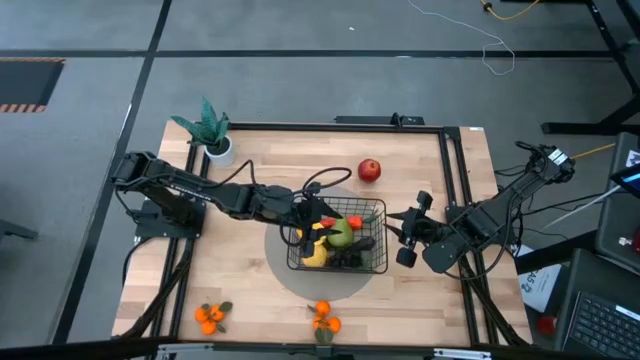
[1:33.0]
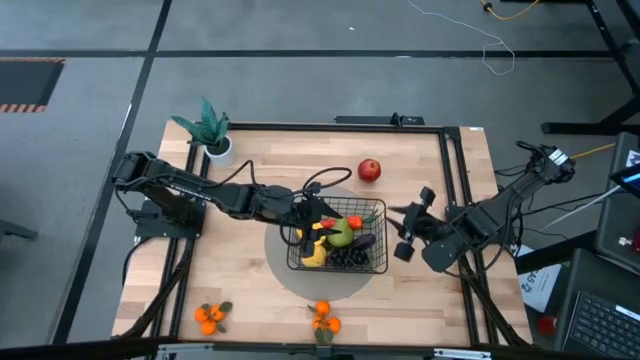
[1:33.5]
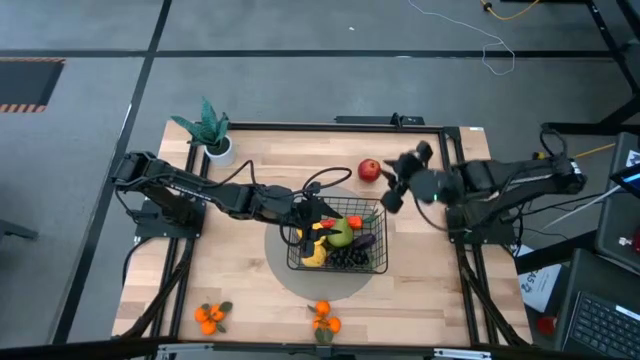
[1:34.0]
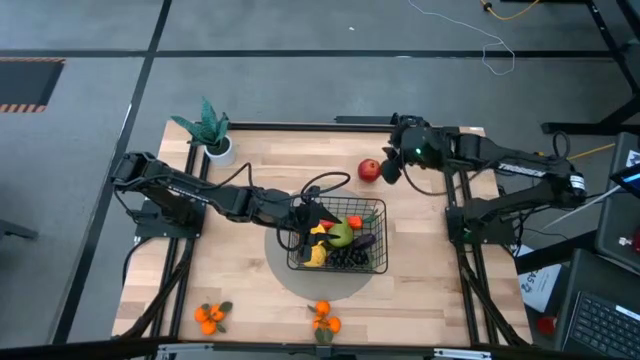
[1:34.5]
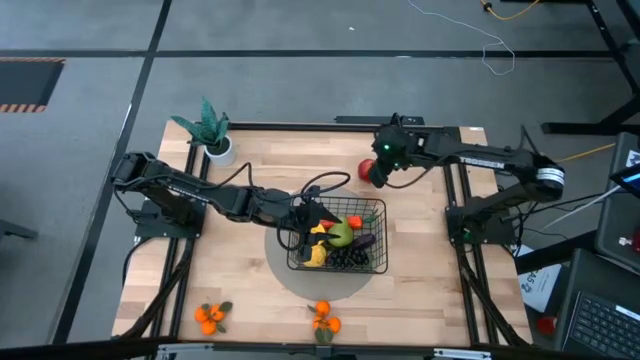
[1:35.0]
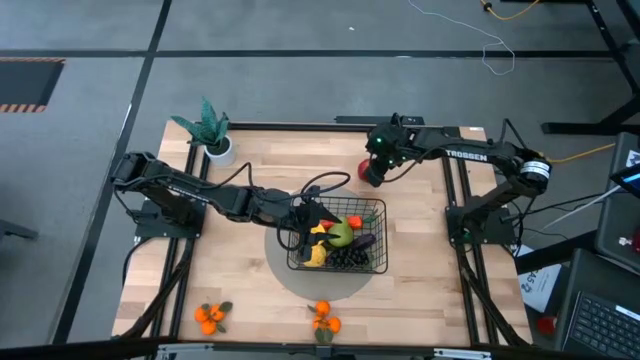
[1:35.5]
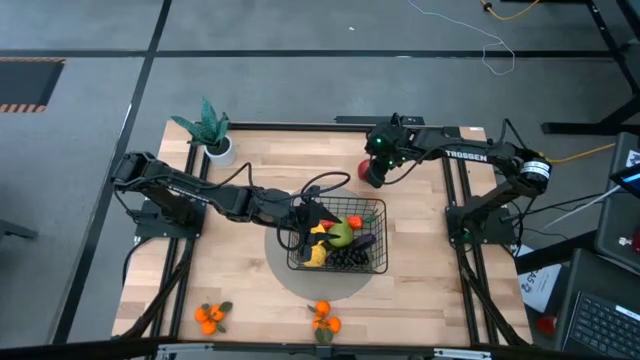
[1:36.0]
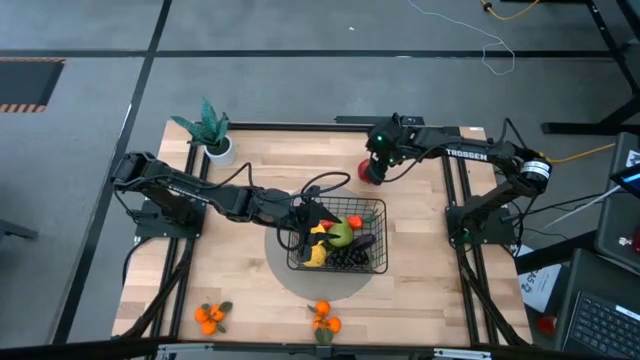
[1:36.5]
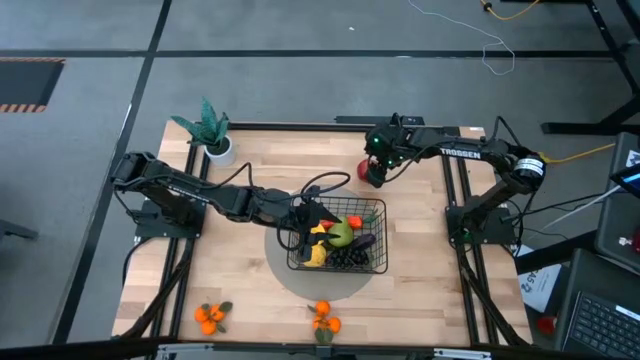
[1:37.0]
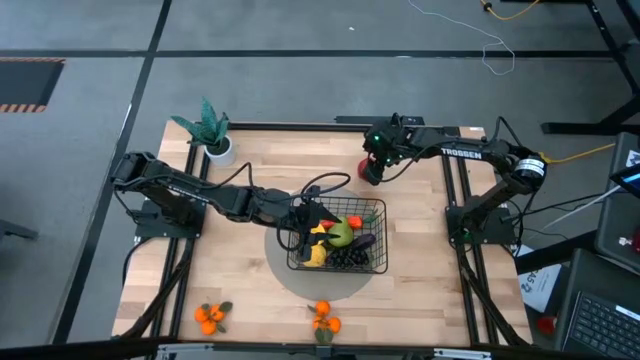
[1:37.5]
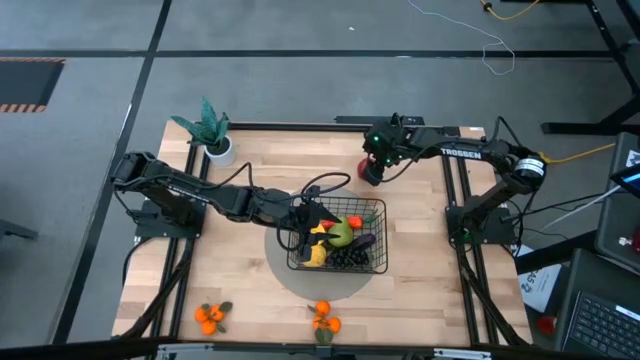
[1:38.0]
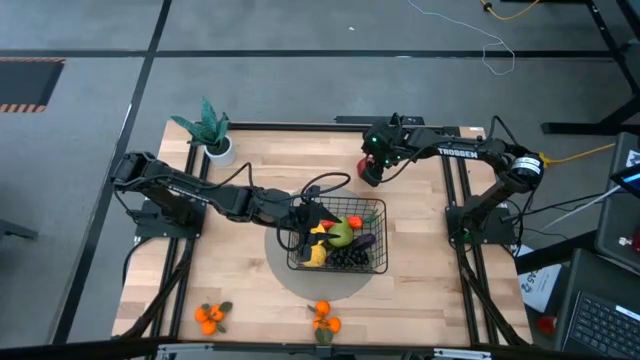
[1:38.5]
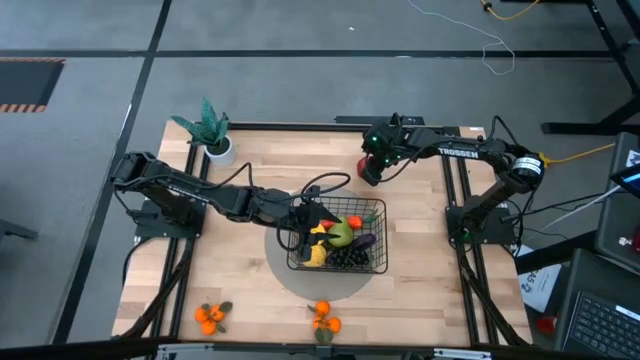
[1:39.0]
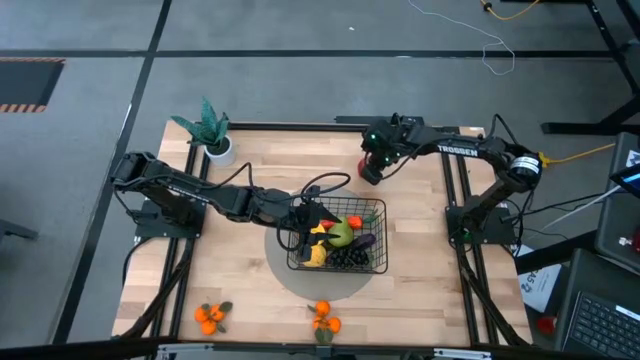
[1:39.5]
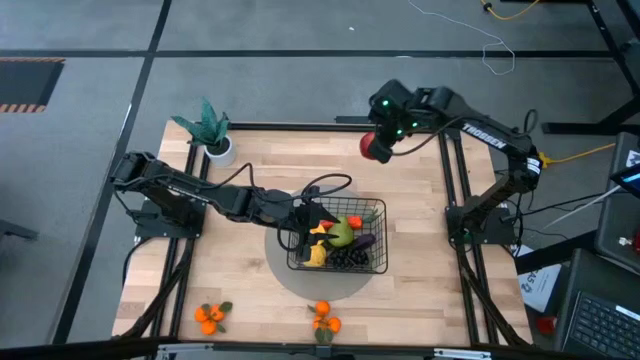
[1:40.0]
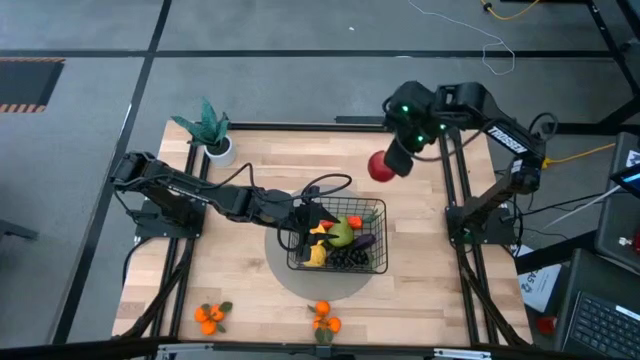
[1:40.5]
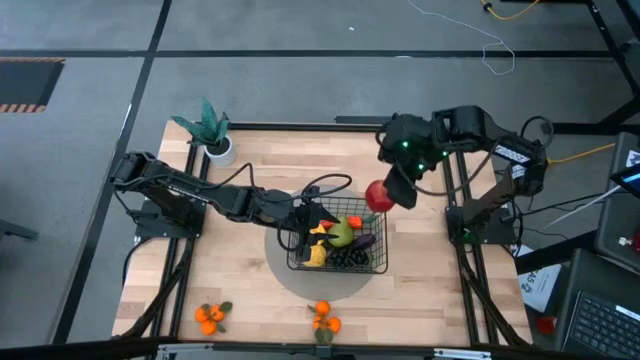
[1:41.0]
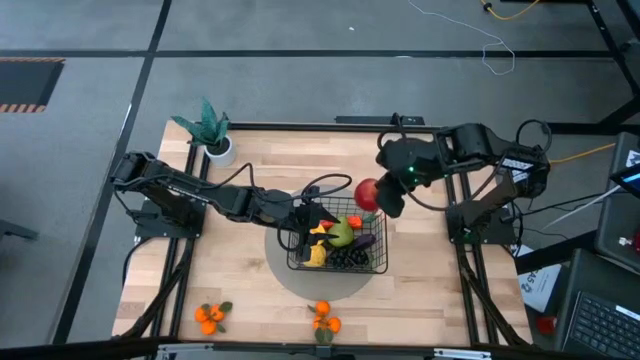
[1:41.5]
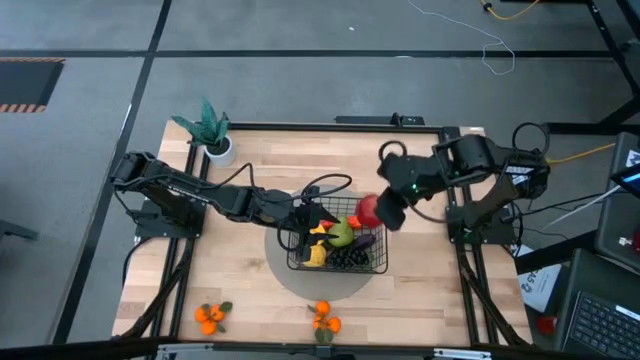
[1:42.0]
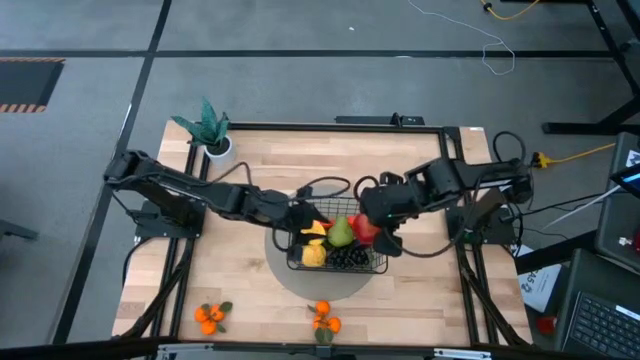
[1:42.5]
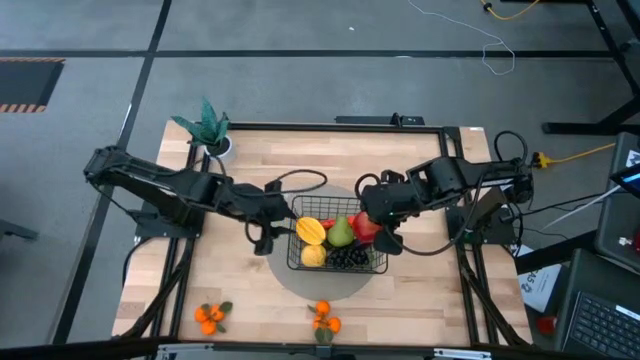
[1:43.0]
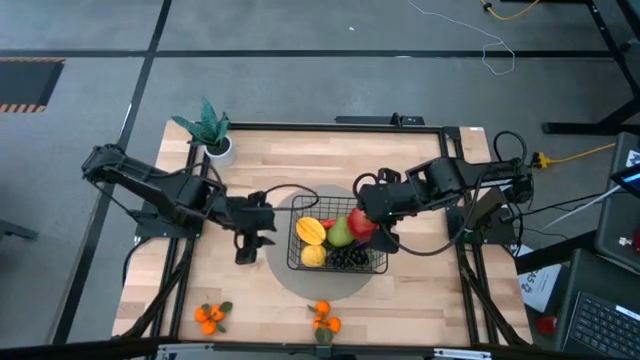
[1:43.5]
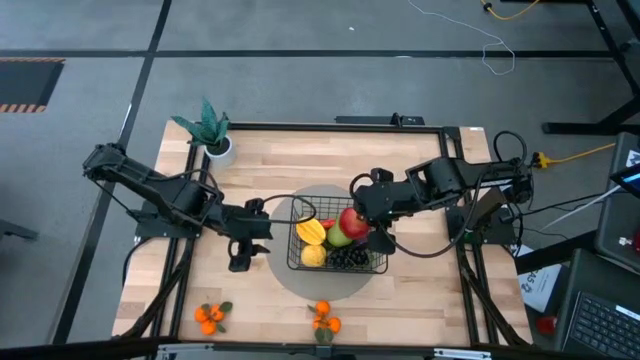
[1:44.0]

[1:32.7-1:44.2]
Task: Build produce basket
Put the red pomegranate into the wire basket

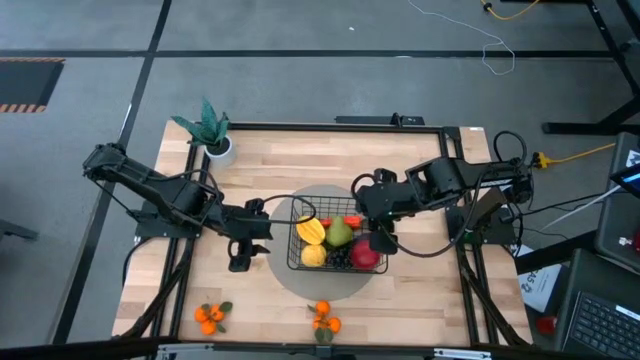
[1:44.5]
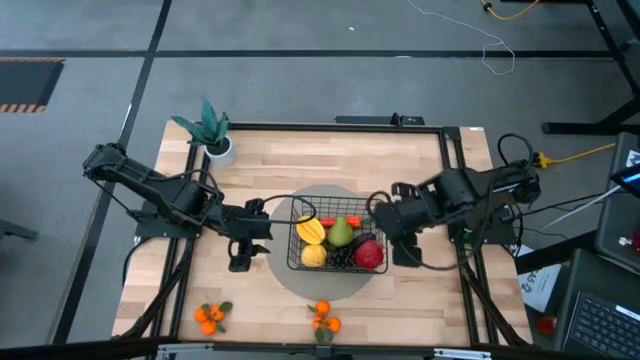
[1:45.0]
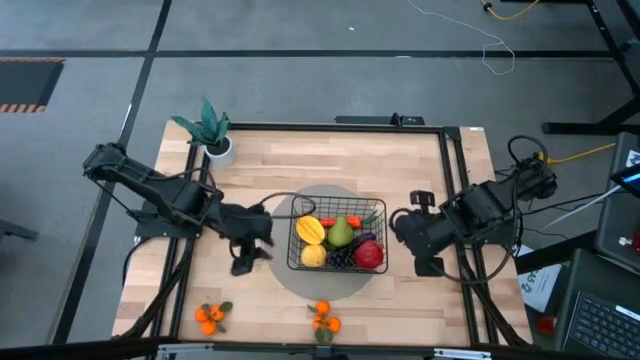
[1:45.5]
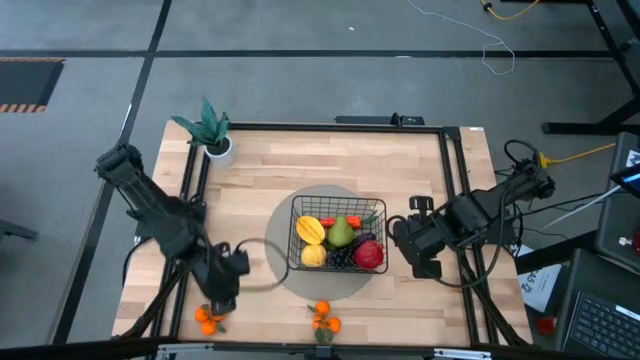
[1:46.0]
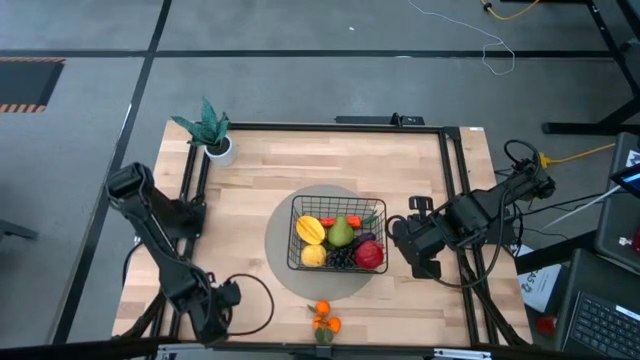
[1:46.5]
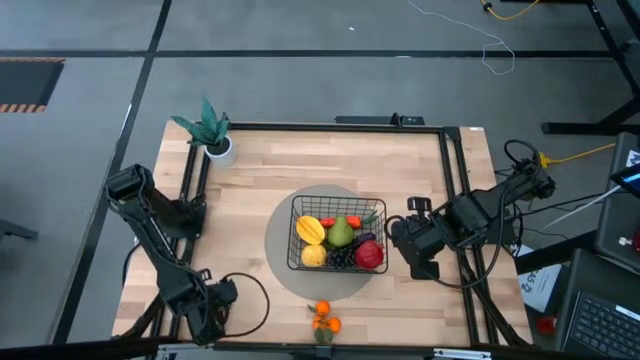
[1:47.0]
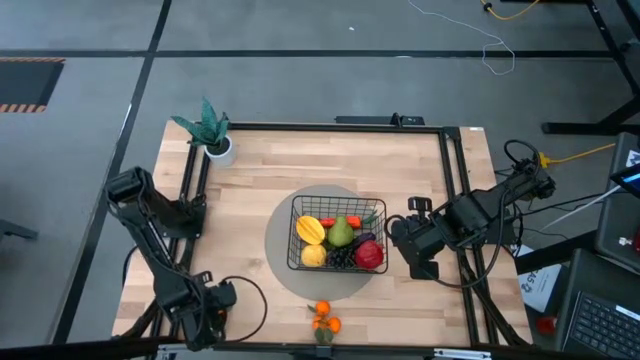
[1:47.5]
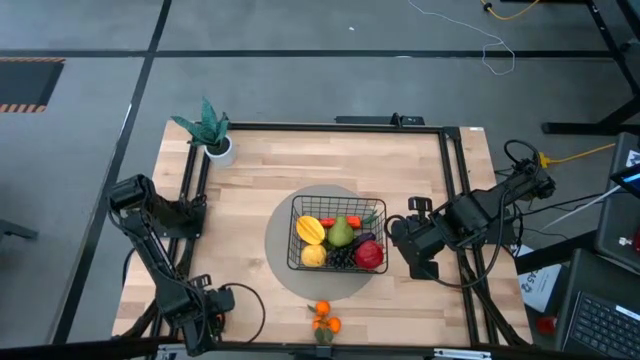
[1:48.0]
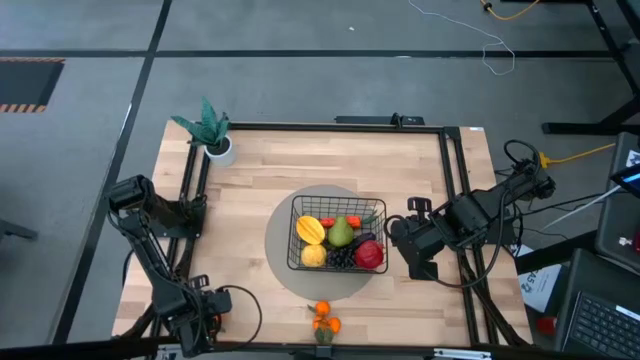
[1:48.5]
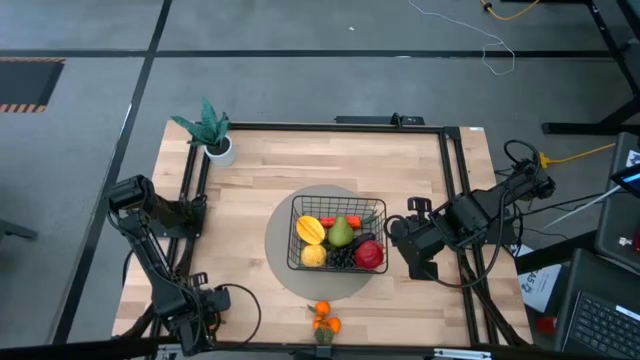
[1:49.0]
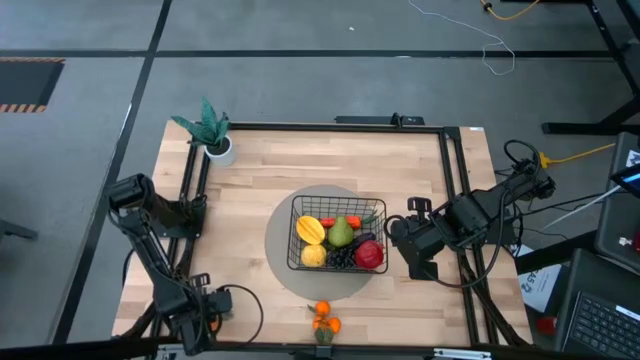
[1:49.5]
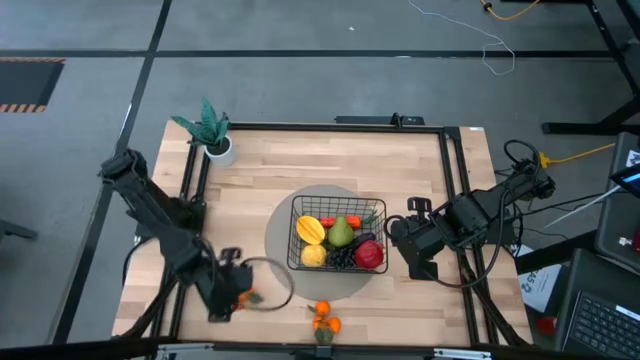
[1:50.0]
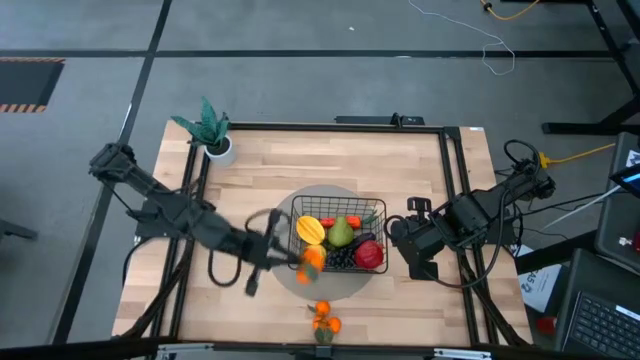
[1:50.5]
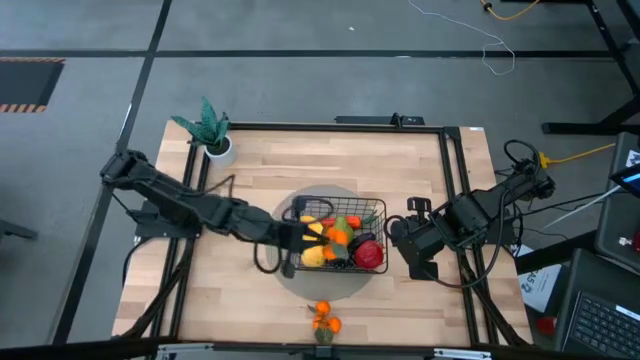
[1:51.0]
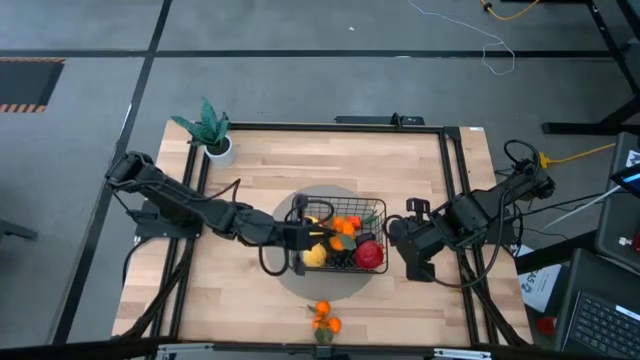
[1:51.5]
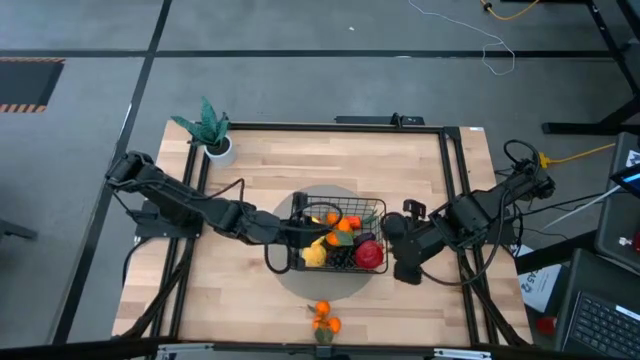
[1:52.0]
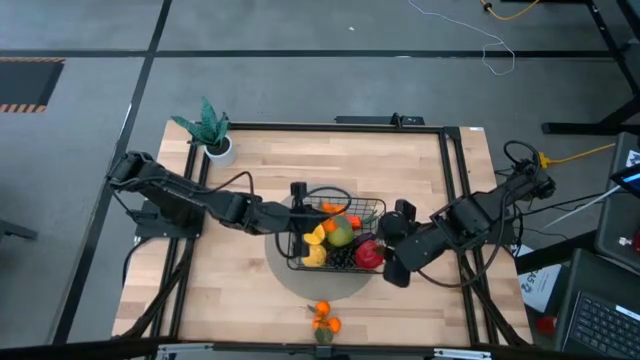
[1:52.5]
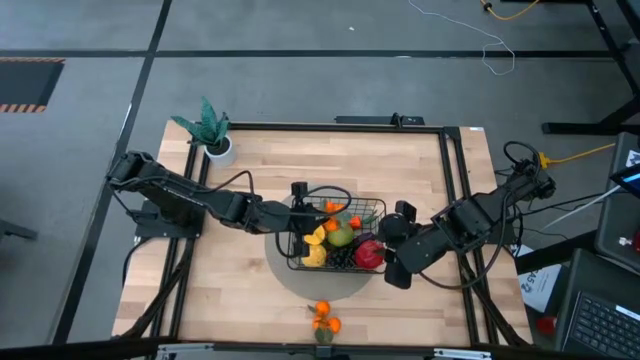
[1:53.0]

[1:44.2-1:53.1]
Put the left orange tangerine into the wire basket

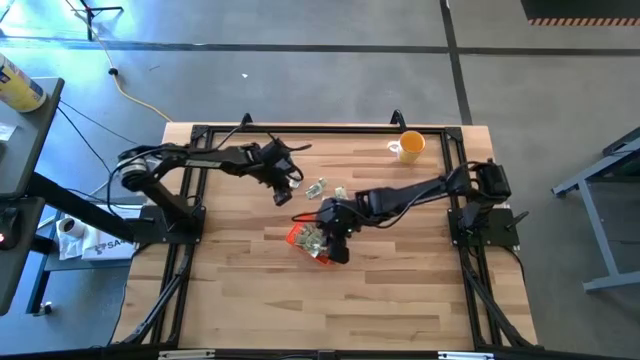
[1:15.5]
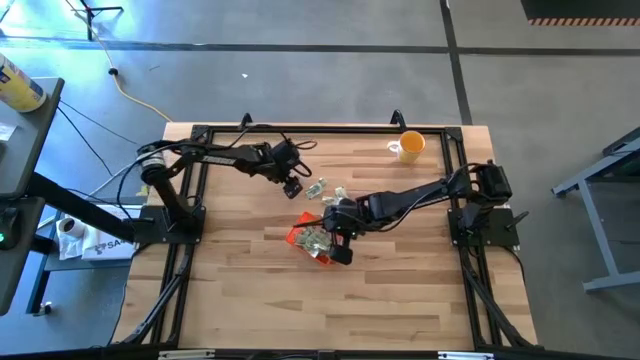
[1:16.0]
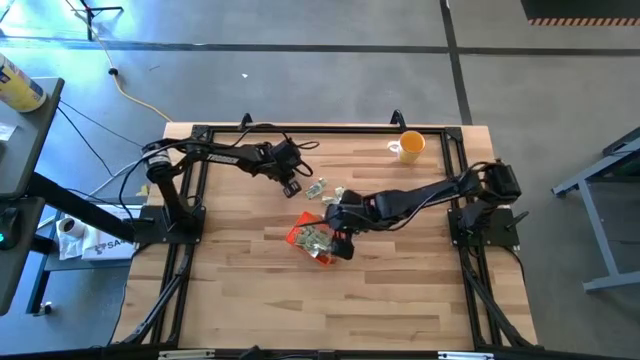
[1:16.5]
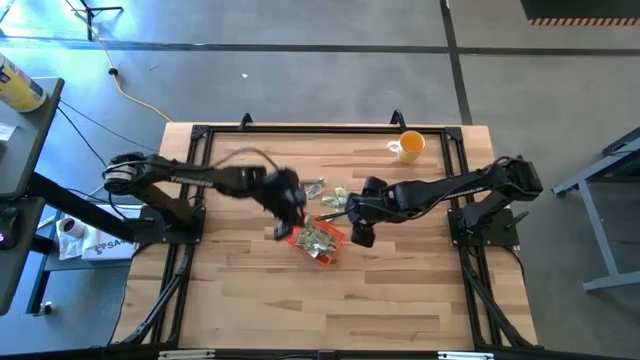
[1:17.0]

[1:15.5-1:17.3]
Task: Pick and place Stevia / Truvia into bins
Put the stevia packet into the orange bin

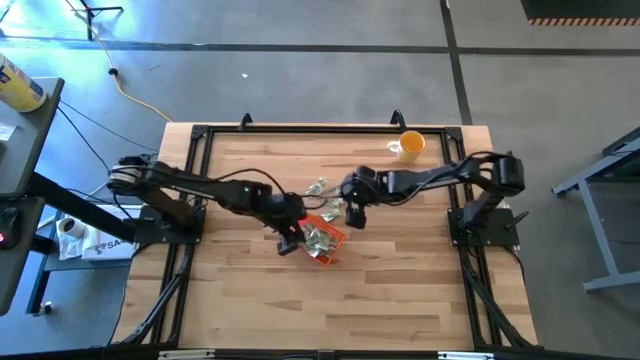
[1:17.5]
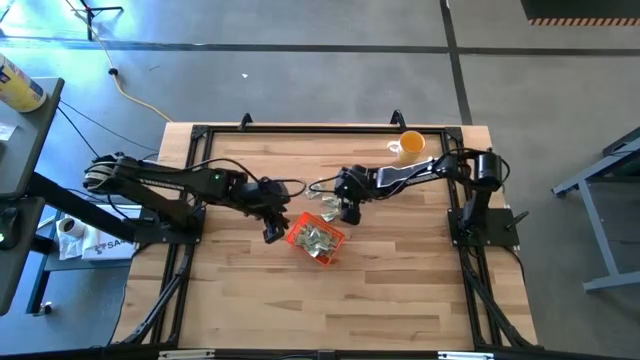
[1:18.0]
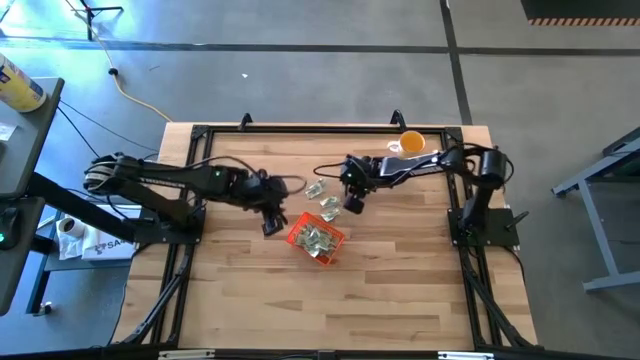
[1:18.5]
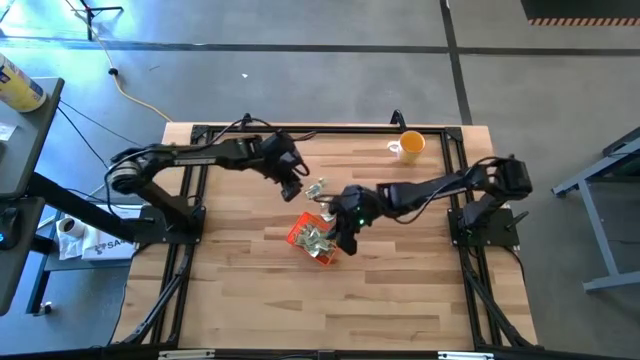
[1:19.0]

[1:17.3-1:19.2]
Put the stevia packet into the orange bin
